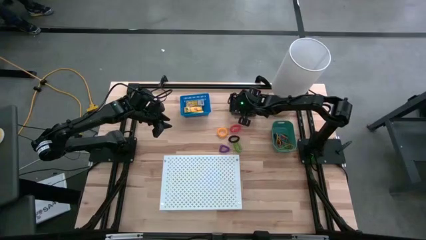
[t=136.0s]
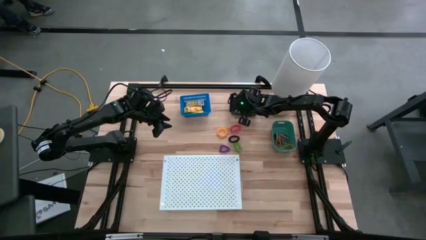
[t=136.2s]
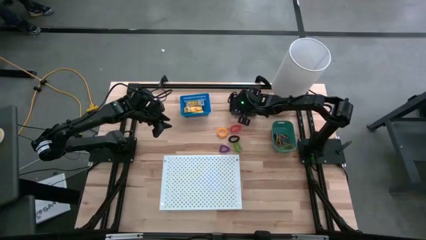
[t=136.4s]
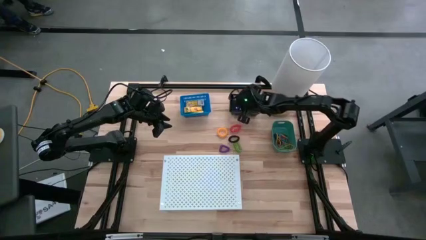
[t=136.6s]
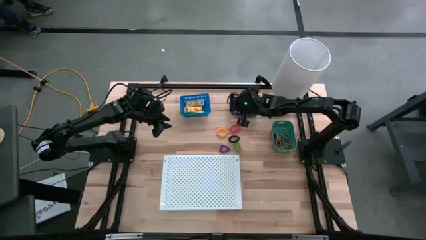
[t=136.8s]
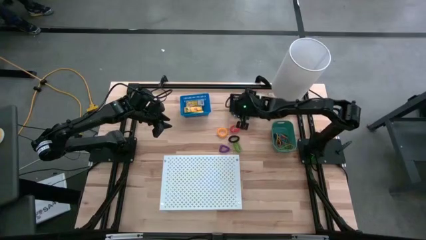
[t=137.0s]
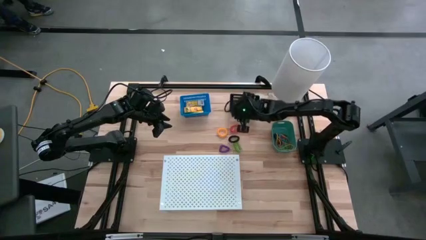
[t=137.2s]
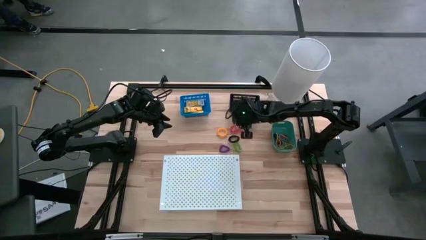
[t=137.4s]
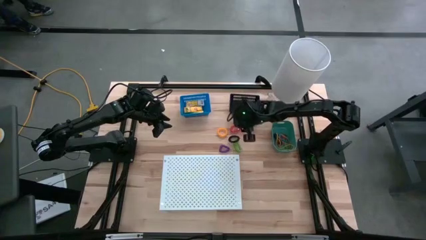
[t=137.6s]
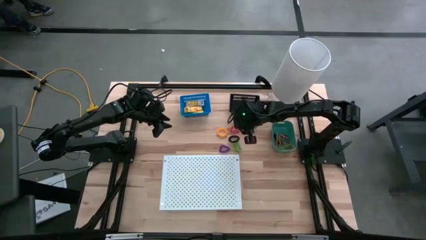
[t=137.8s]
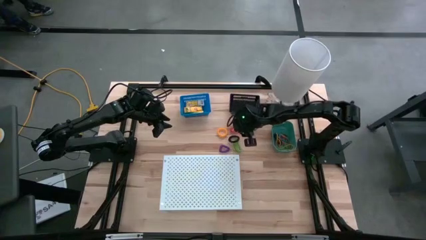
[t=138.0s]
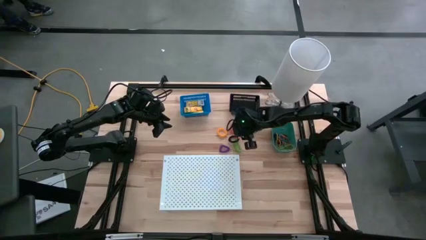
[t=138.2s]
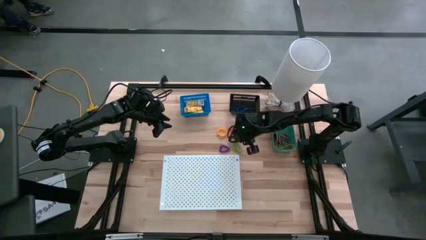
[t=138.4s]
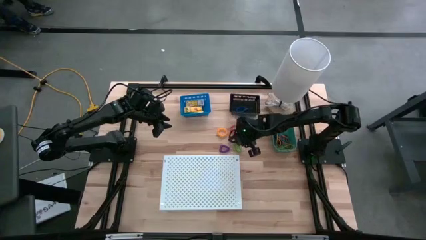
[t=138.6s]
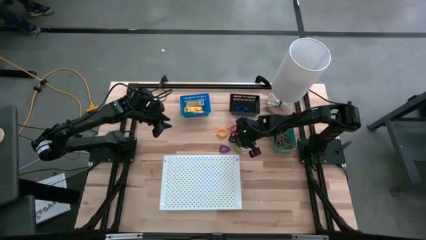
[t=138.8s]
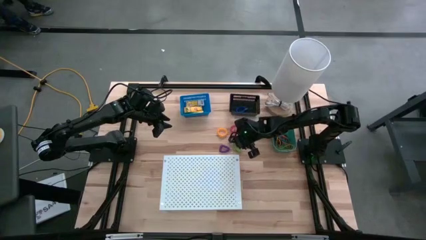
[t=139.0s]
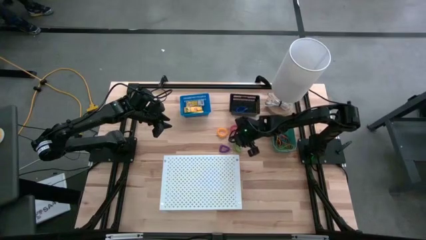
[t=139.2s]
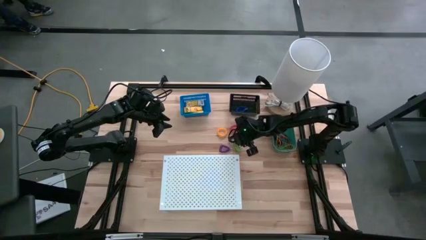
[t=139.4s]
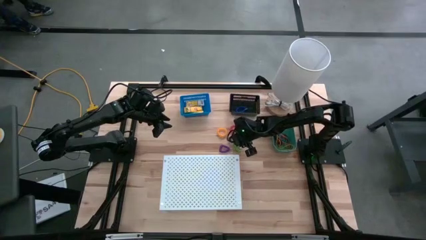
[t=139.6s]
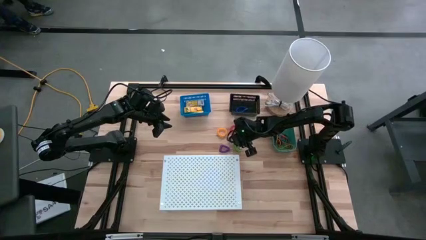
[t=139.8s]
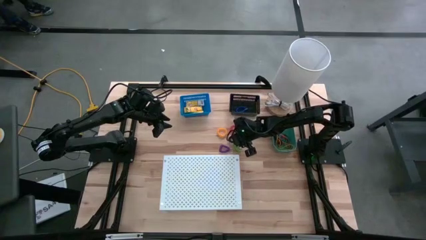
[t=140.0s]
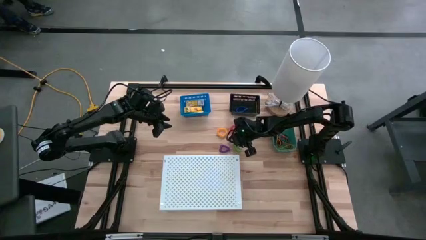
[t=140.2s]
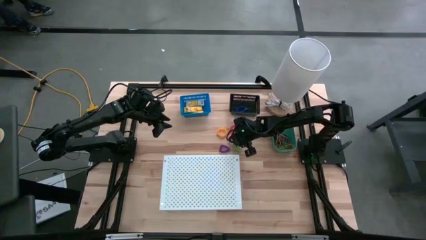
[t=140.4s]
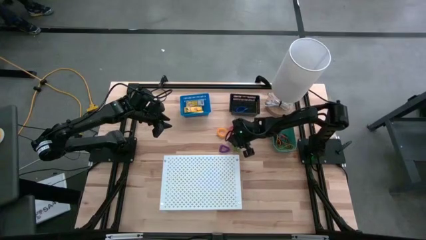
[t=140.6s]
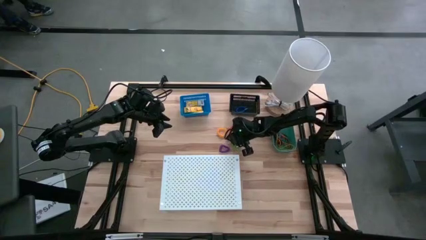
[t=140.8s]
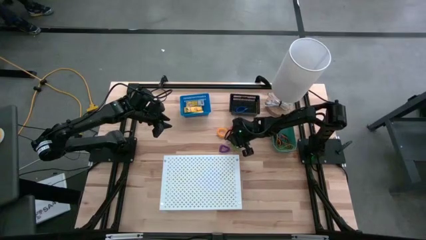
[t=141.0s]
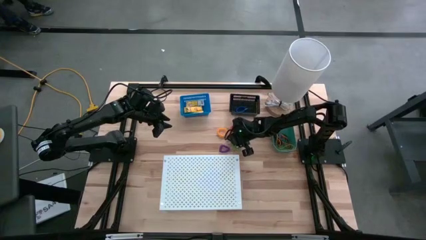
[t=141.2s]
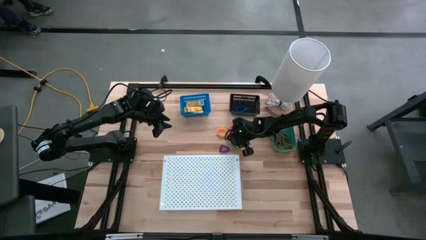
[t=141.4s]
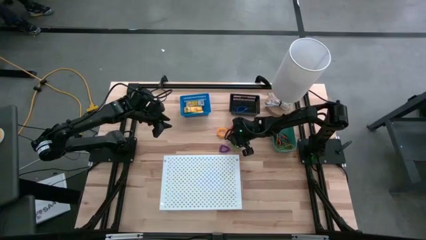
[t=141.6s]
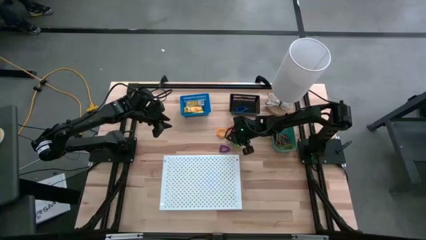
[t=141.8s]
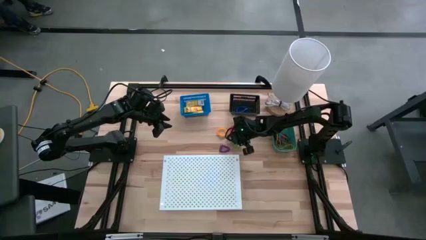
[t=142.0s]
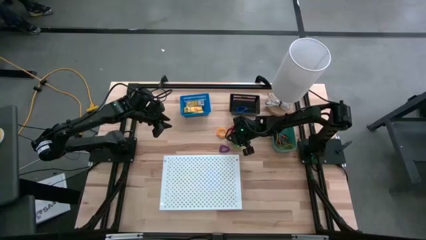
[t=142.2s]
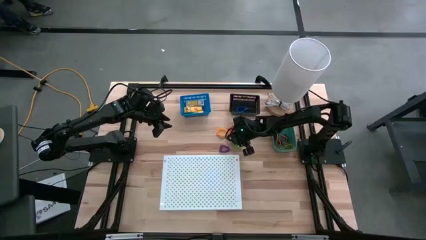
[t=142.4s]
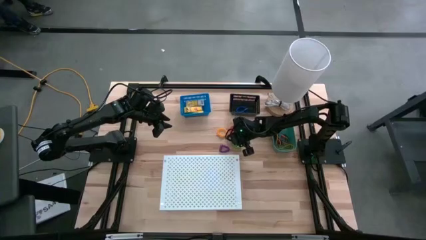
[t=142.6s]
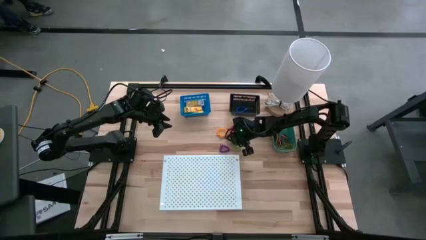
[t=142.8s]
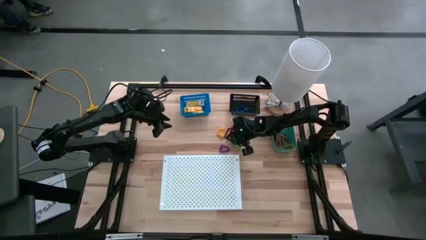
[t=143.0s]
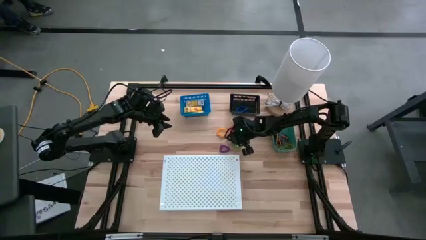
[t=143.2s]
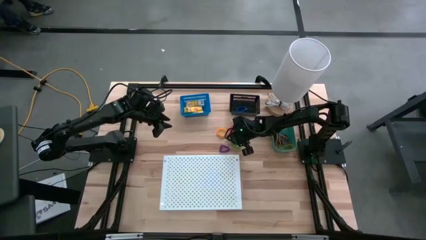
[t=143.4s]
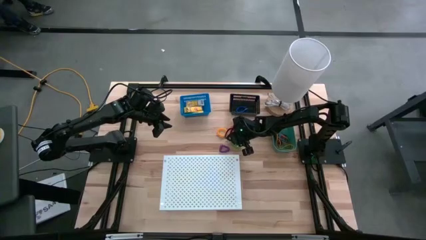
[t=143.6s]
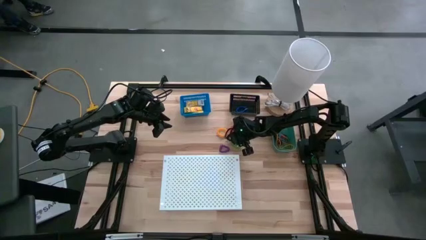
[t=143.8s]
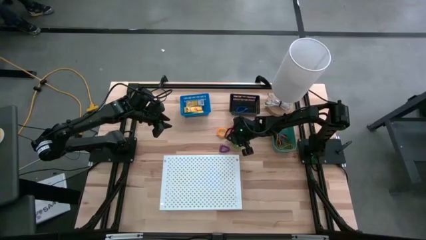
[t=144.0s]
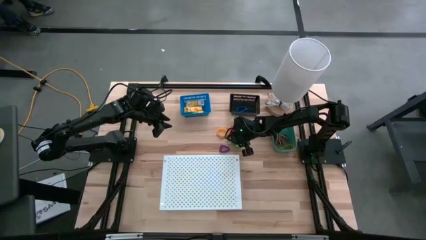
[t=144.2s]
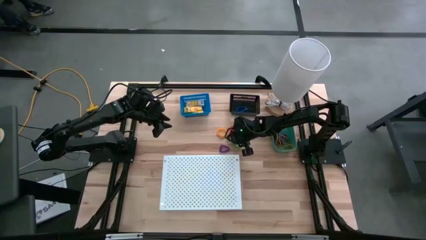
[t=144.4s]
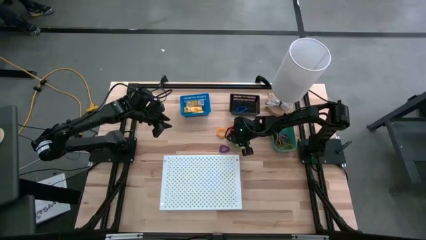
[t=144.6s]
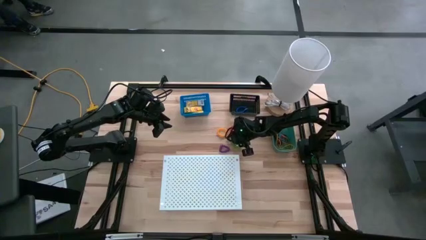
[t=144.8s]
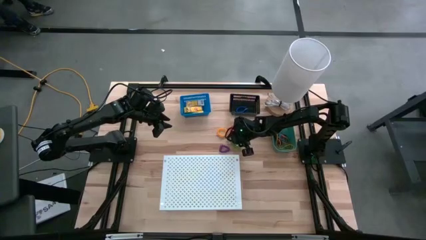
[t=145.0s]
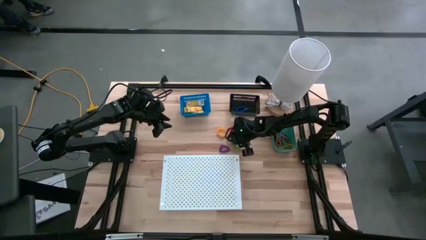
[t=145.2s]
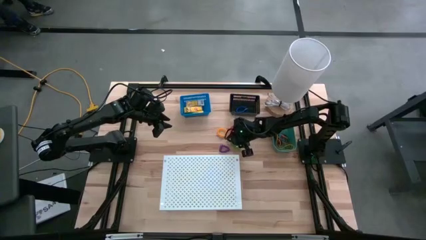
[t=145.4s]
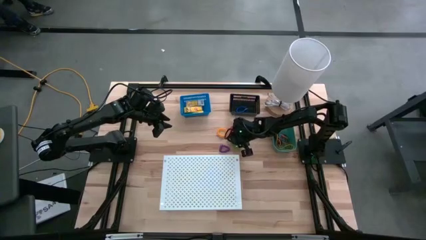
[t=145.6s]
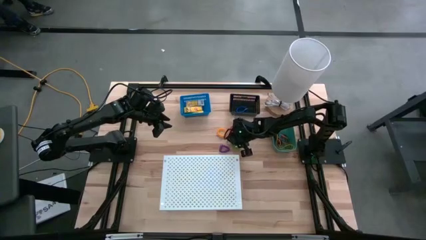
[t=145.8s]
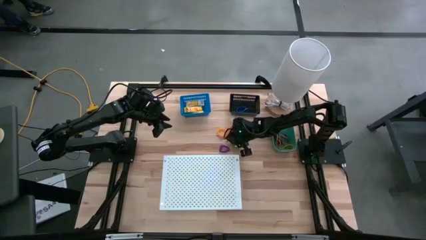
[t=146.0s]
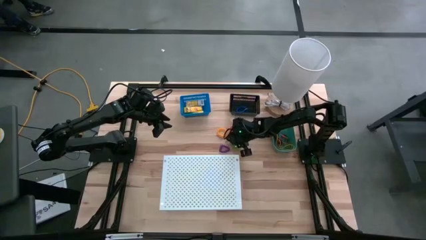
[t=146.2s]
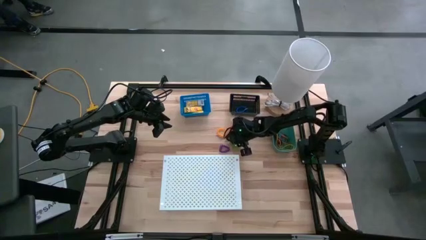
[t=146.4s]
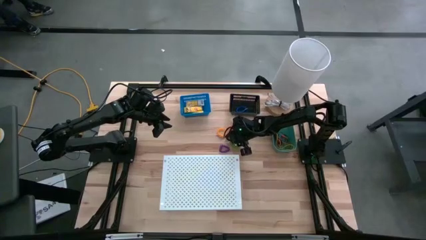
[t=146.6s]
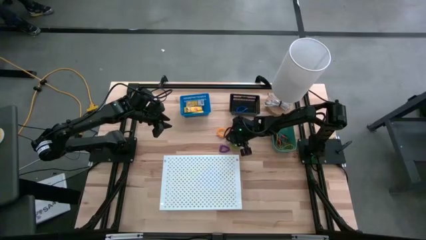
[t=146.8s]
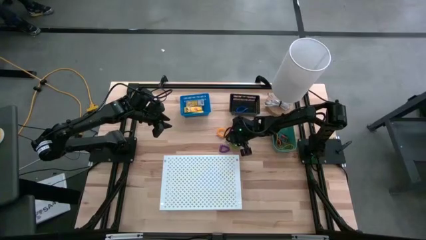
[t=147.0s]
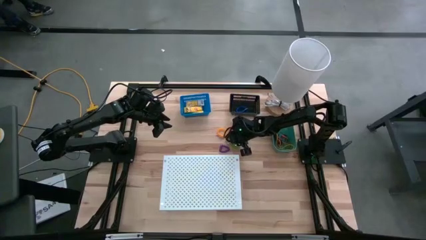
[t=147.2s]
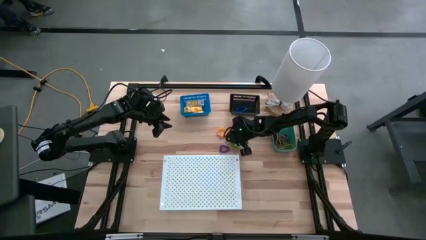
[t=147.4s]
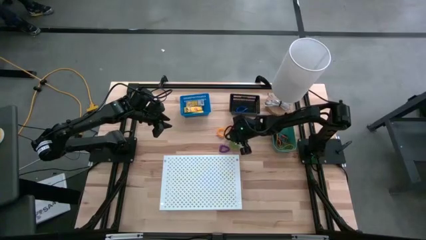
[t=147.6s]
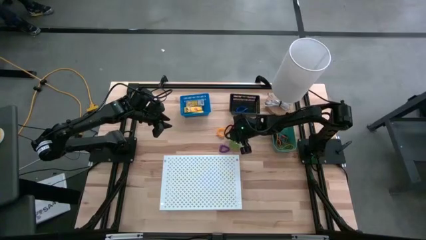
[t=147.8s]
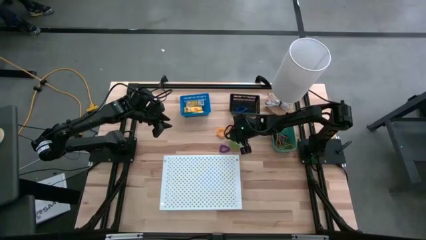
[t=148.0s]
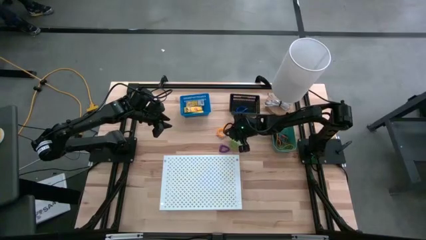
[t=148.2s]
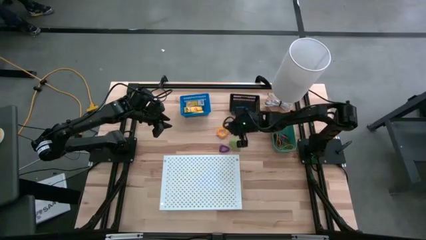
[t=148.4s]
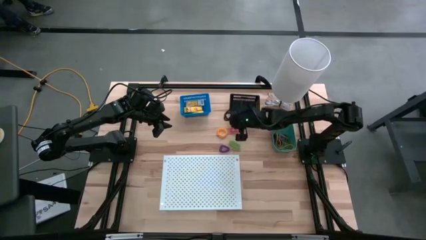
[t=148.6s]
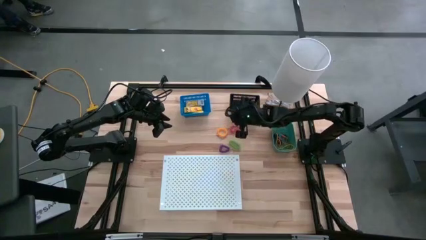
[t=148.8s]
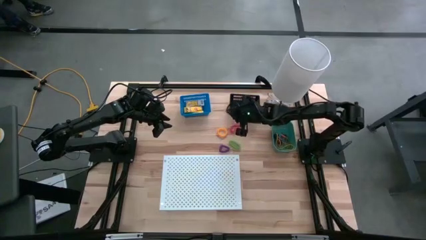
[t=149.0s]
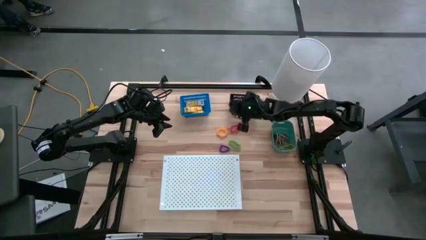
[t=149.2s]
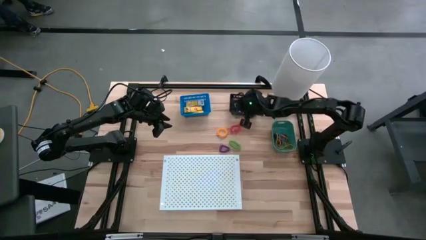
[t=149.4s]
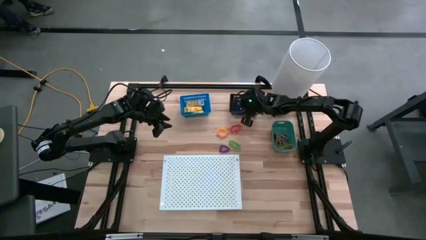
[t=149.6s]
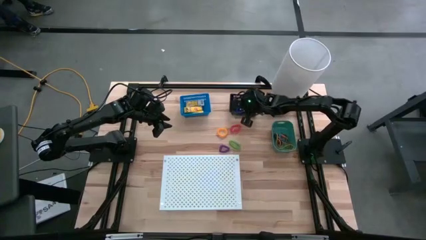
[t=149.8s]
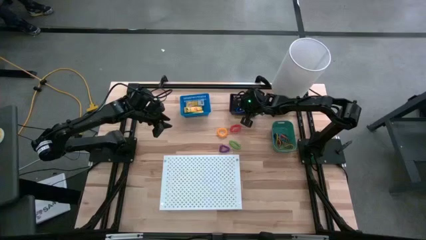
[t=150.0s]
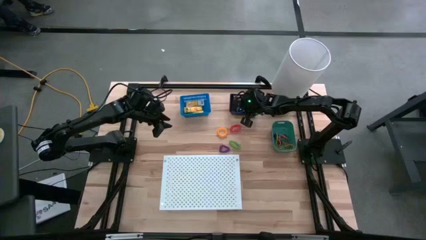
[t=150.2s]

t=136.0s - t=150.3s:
Task: Pick & Place Office Desk Supplies
Put the black spring keychain into the black bin
